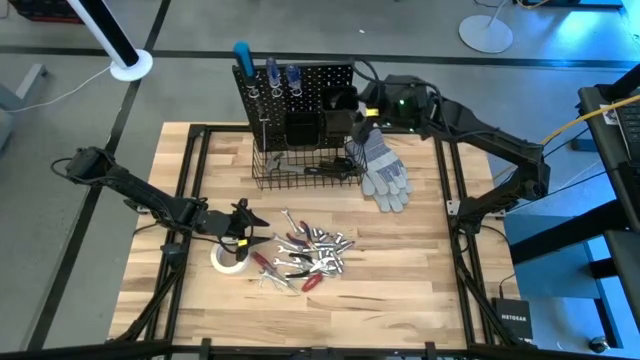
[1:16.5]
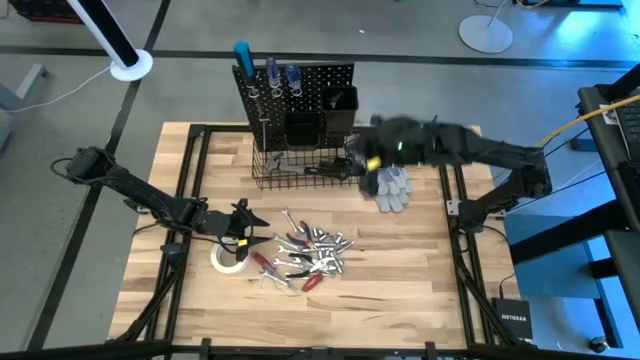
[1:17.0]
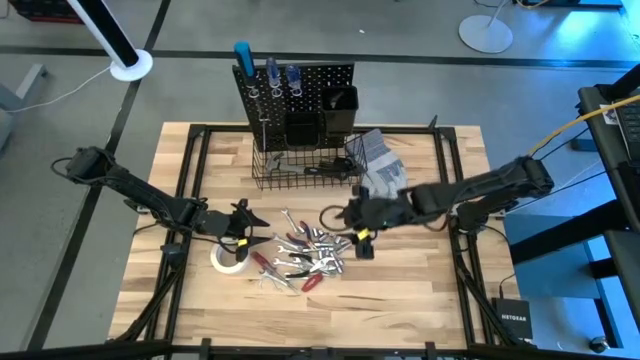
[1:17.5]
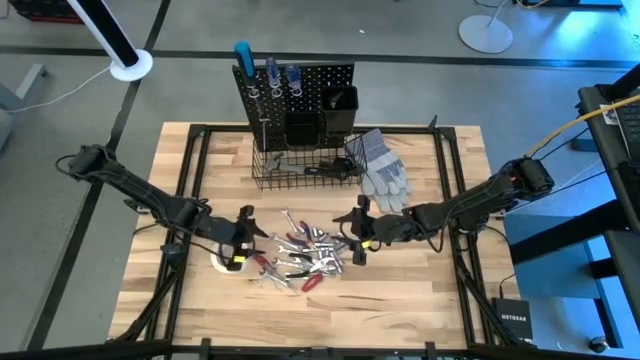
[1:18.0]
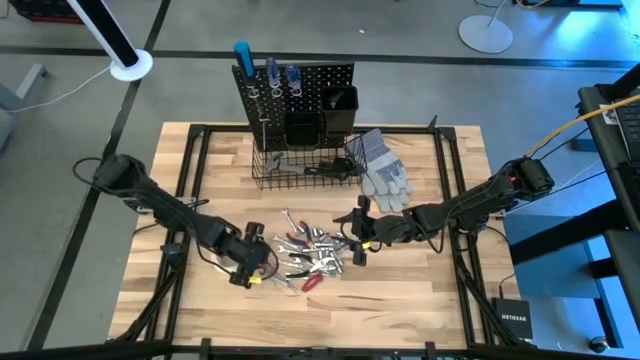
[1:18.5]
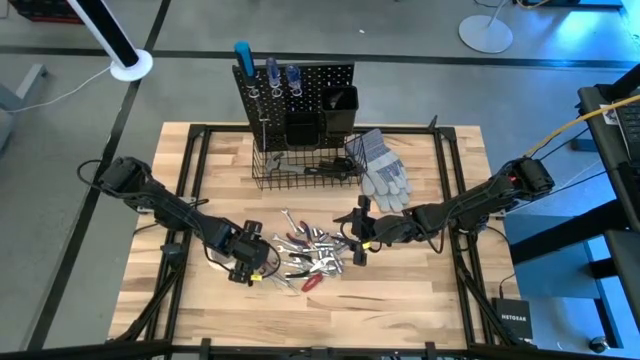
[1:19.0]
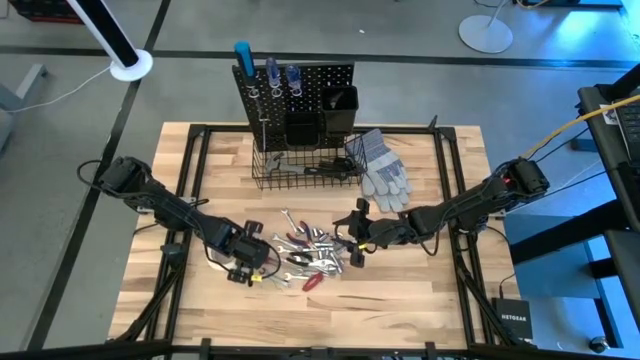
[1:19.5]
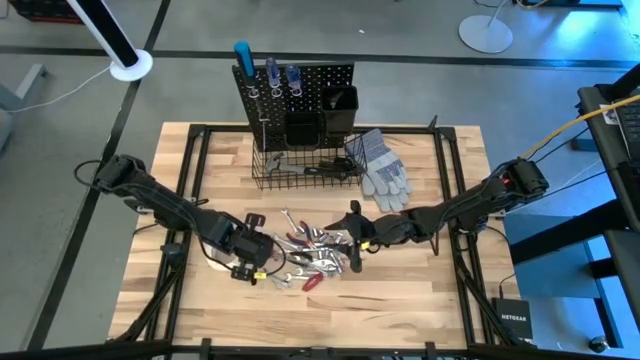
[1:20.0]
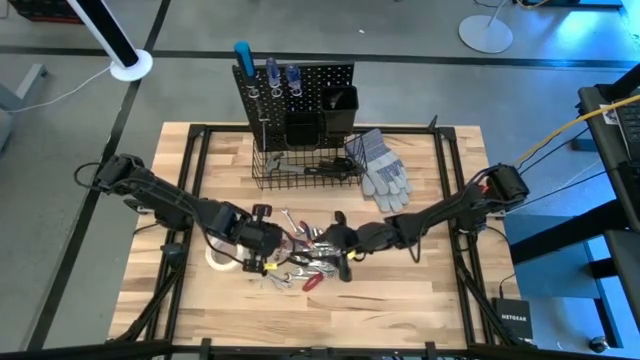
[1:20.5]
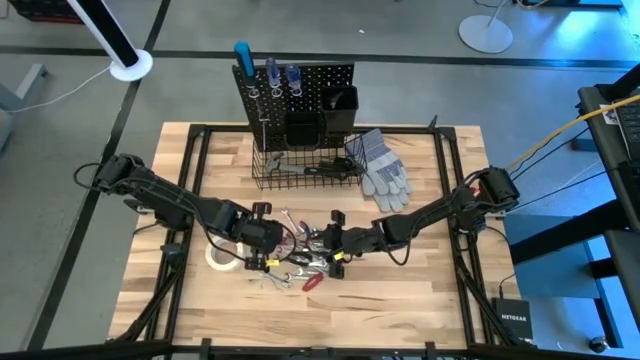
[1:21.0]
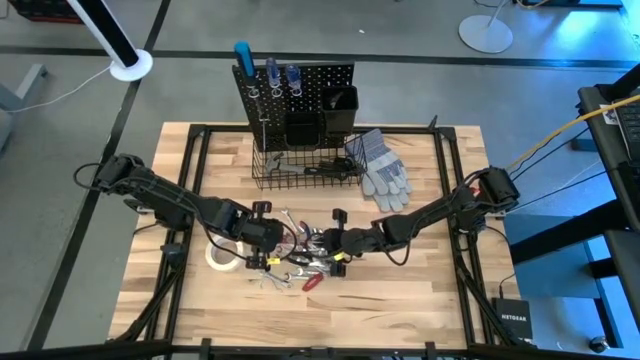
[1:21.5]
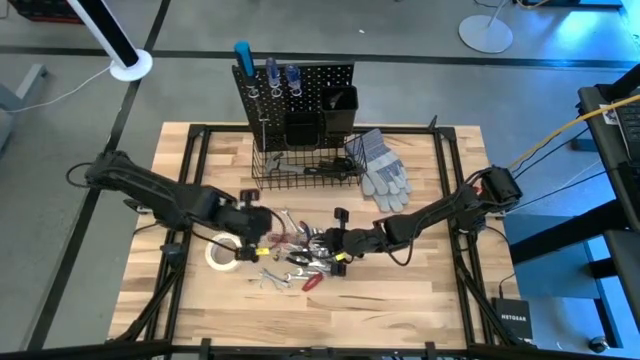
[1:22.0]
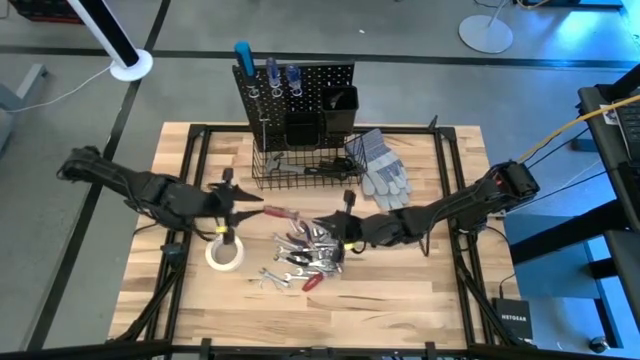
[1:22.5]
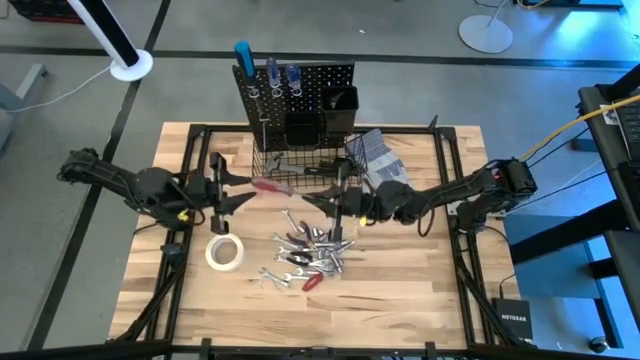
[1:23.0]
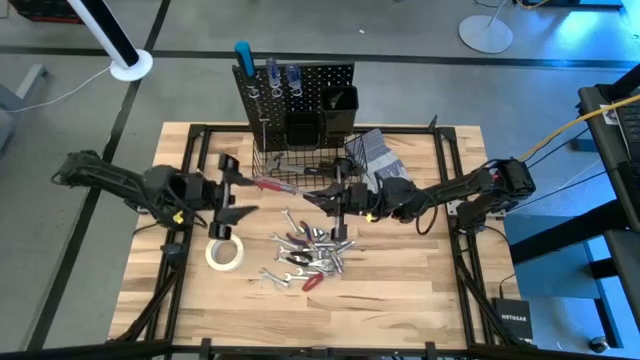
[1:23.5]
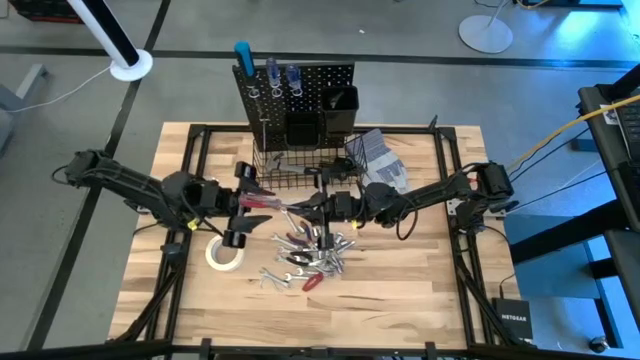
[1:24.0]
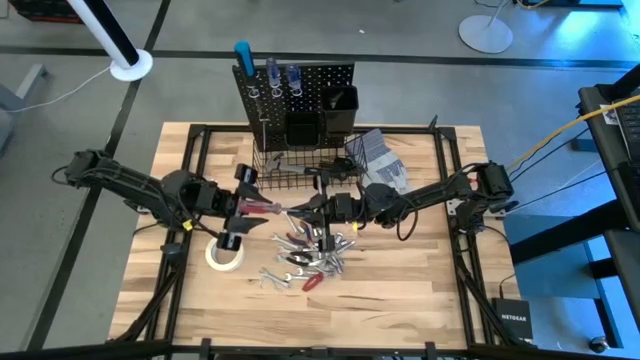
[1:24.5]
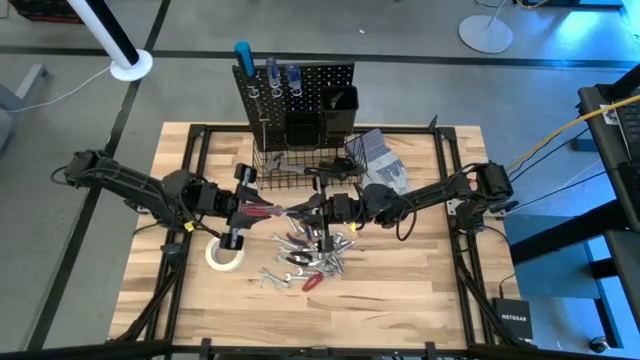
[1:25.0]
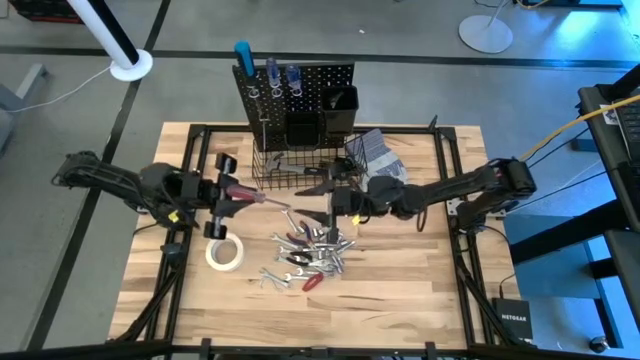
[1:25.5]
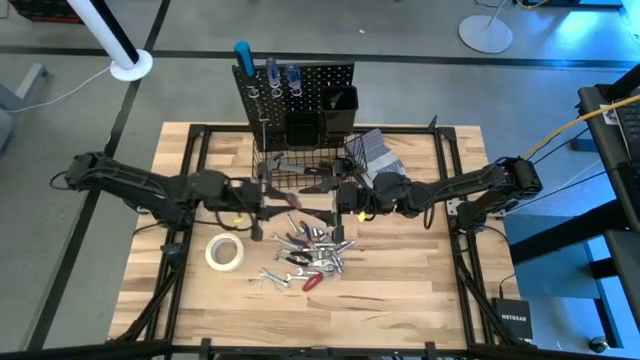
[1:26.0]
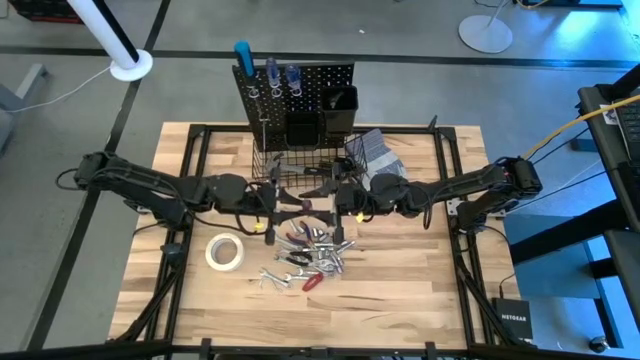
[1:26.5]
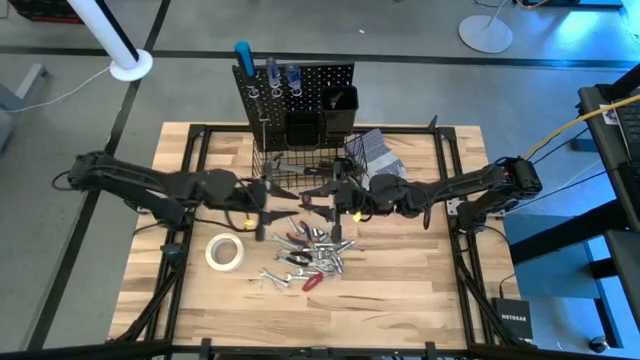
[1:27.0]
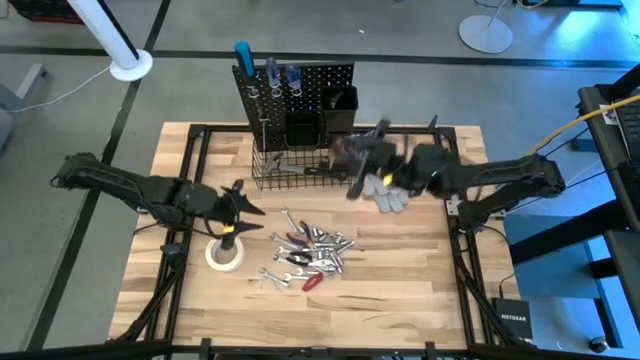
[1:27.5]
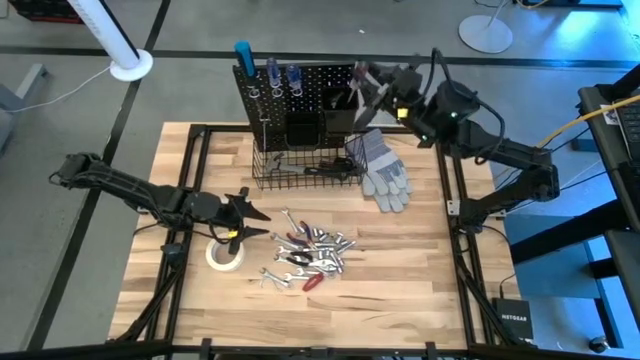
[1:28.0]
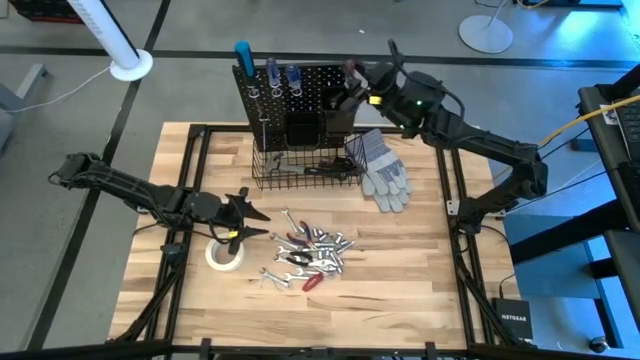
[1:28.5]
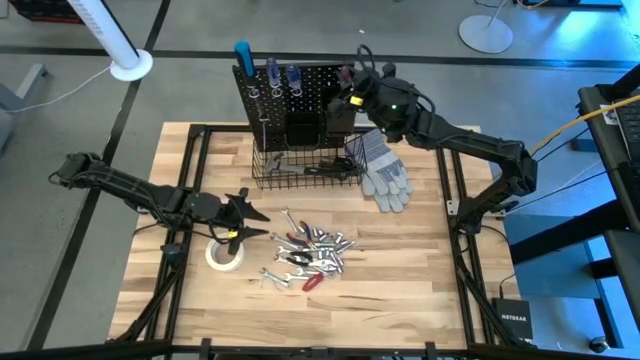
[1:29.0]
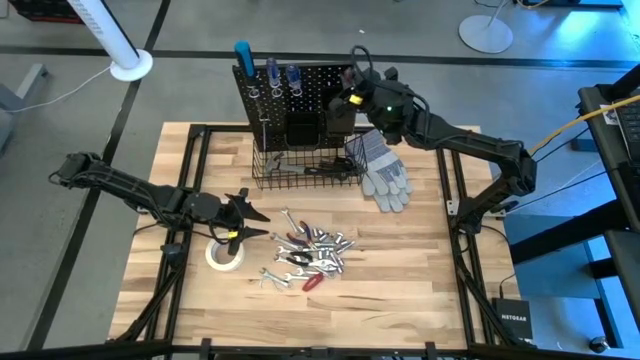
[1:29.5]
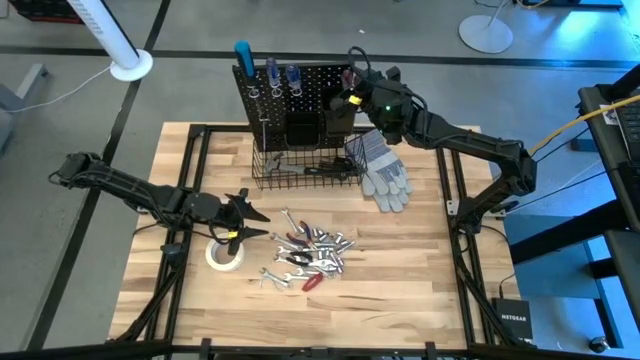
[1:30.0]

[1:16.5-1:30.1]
Task: Hang tools onto peg board
Put the transparent red screwdriver into the right black bin on the peg board

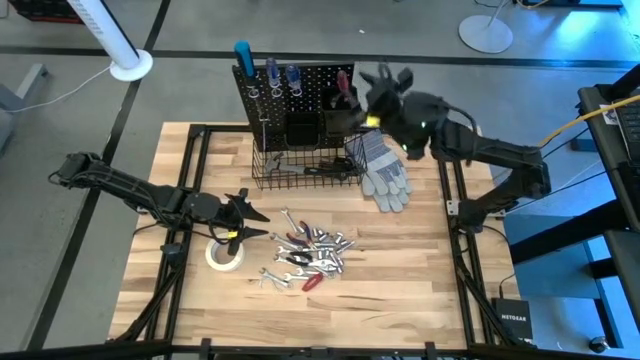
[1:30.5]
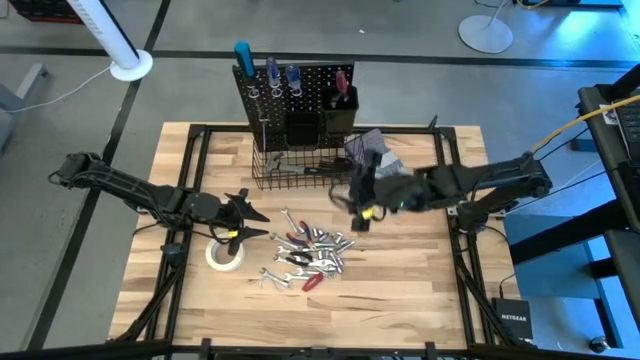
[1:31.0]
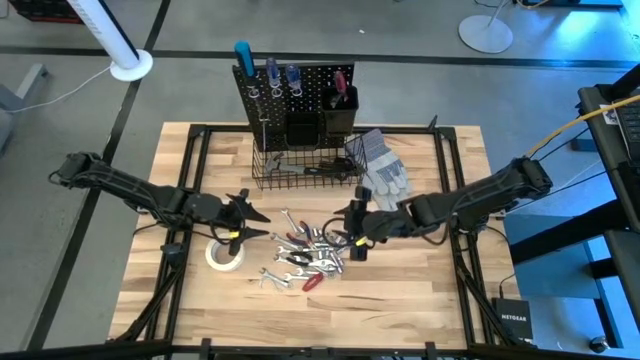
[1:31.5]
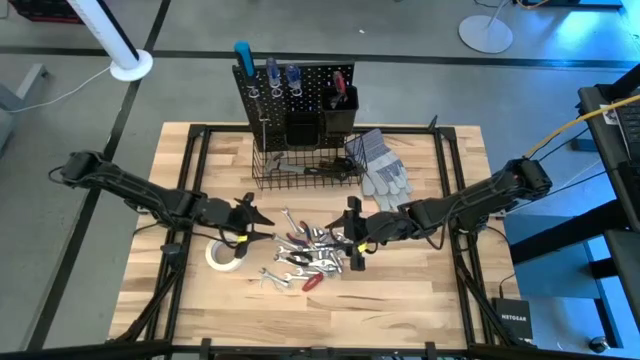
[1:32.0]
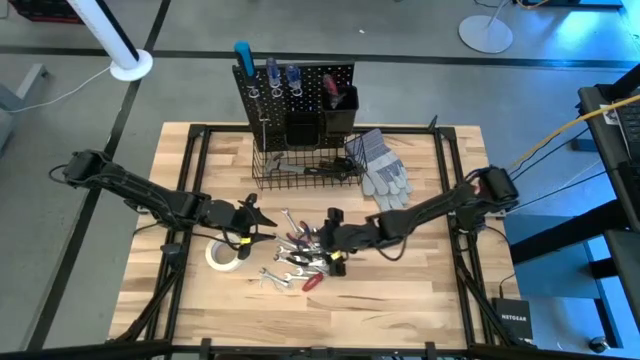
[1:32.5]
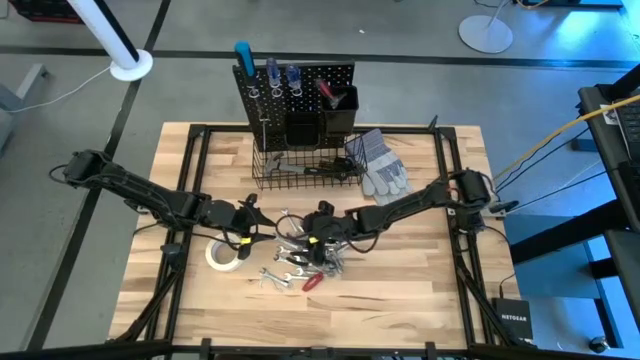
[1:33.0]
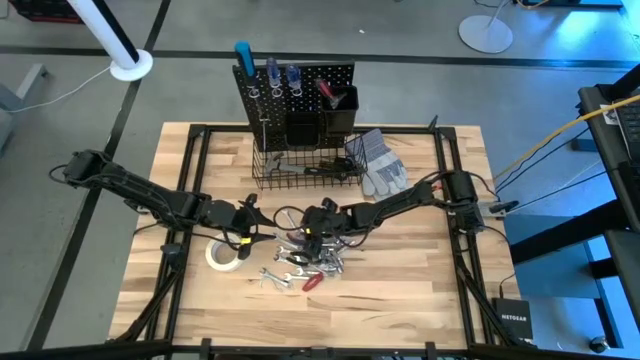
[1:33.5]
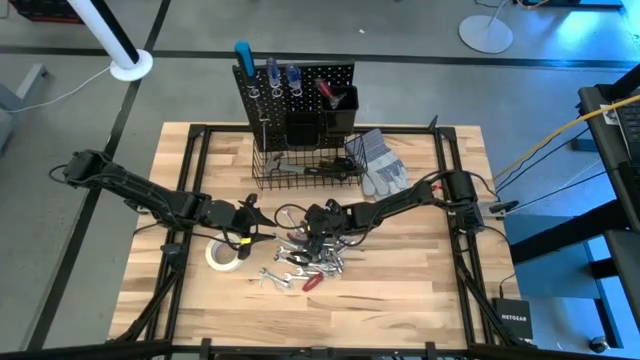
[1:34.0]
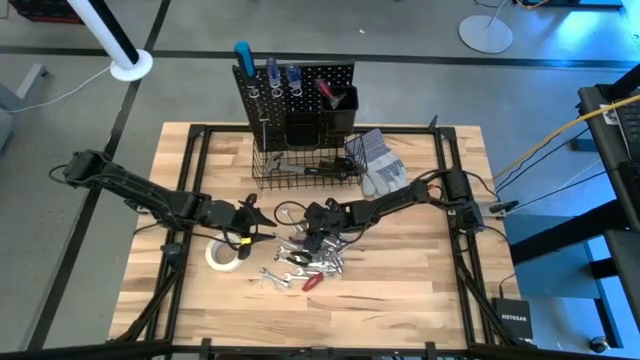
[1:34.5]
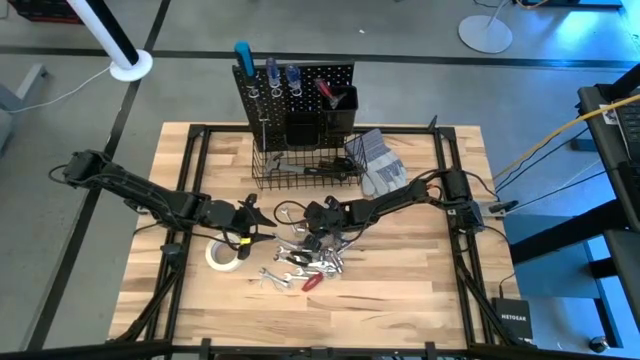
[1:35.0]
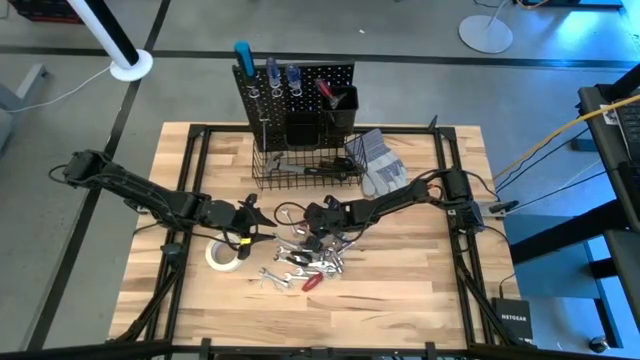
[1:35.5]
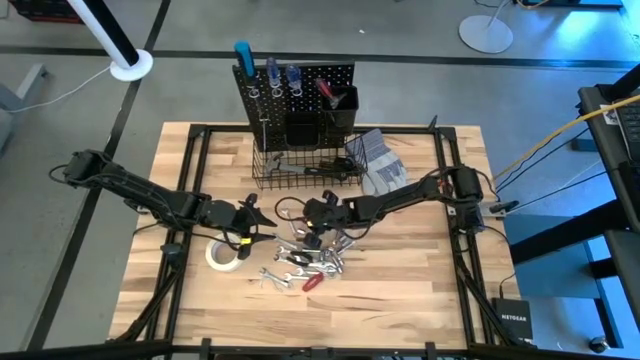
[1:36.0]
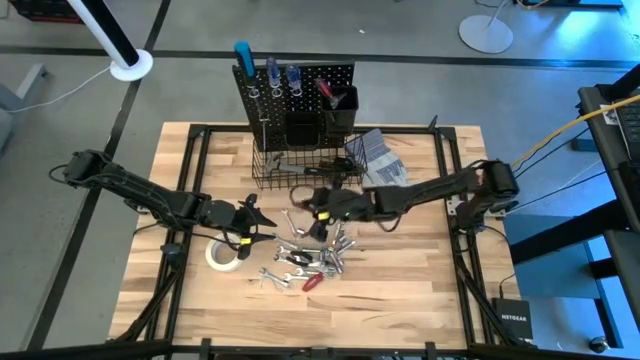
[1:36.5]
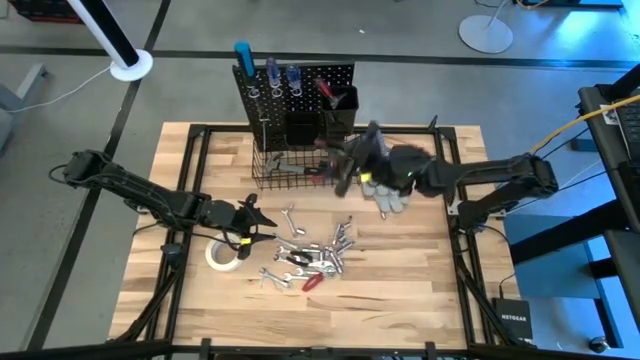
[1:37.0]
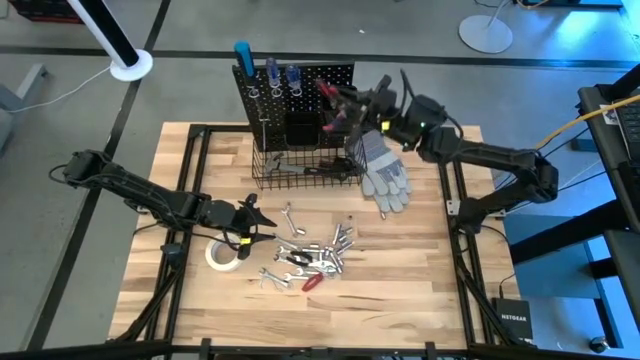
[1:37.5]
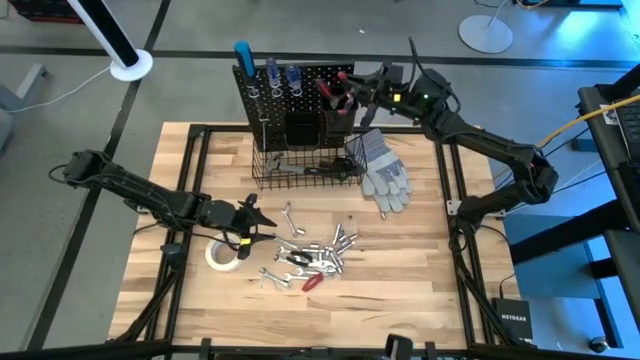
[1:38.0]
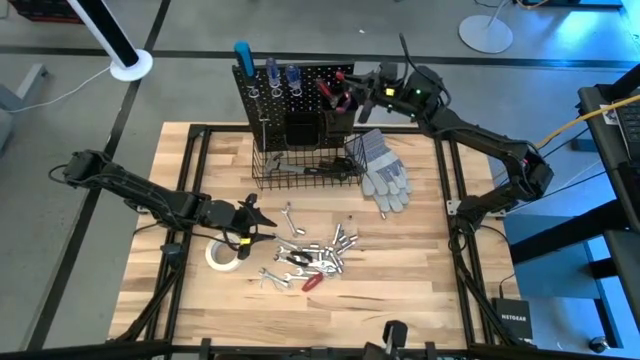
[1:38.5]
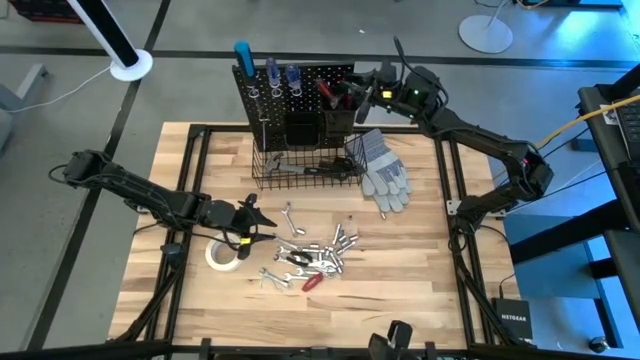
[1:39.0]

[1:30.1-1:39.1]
Put the blue pliers into the right black bin on the peg board
